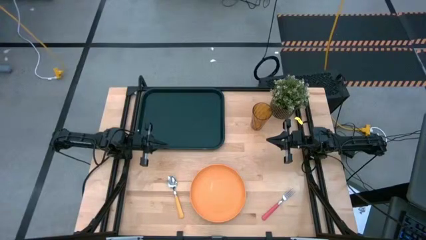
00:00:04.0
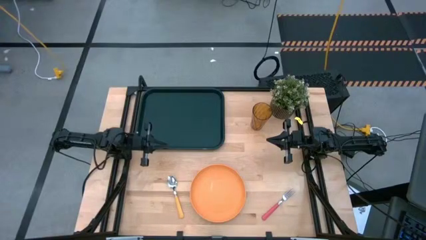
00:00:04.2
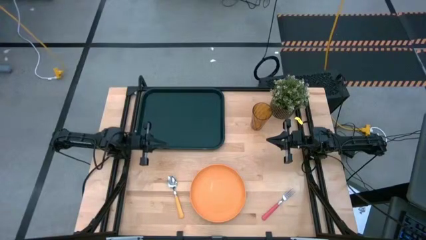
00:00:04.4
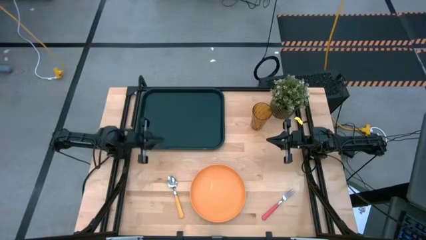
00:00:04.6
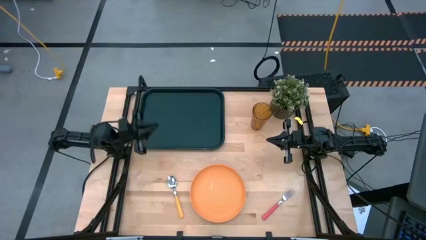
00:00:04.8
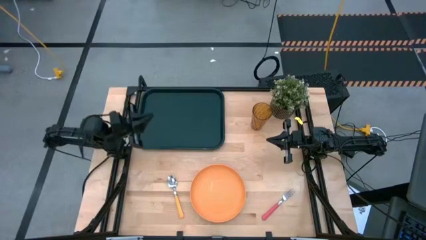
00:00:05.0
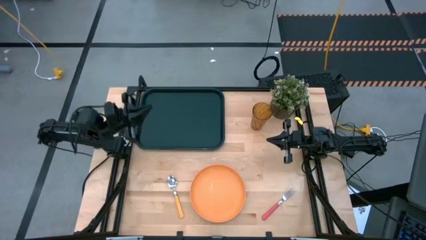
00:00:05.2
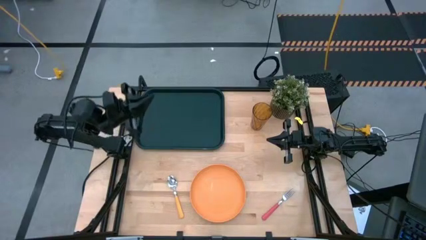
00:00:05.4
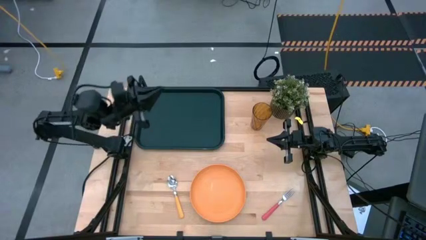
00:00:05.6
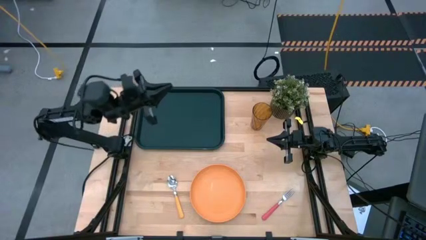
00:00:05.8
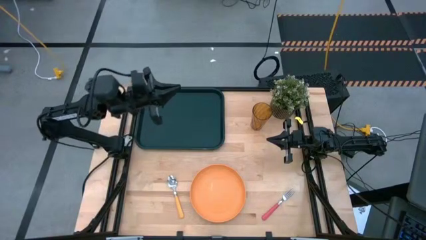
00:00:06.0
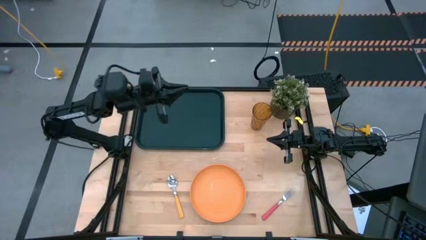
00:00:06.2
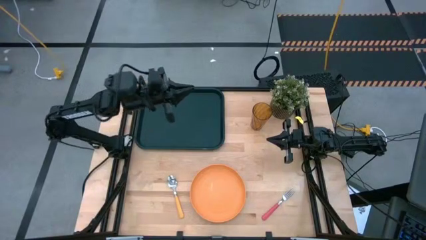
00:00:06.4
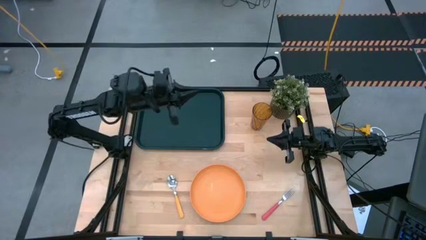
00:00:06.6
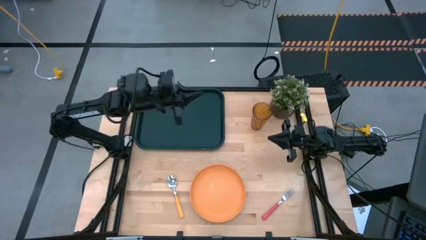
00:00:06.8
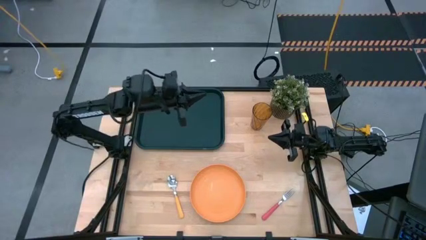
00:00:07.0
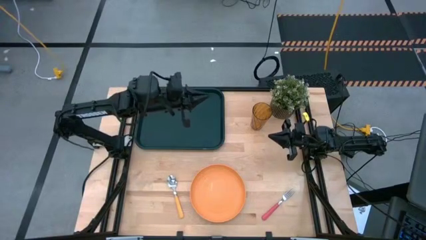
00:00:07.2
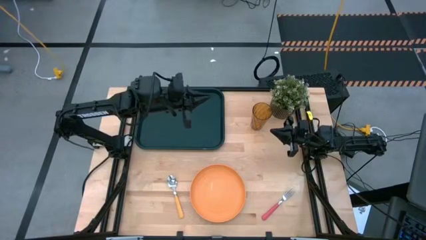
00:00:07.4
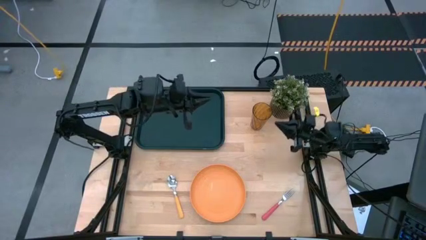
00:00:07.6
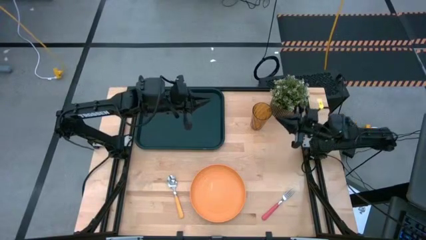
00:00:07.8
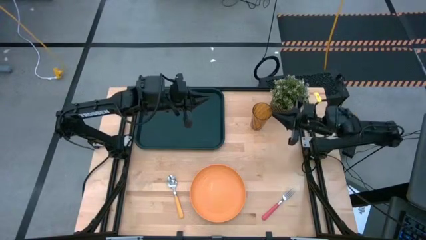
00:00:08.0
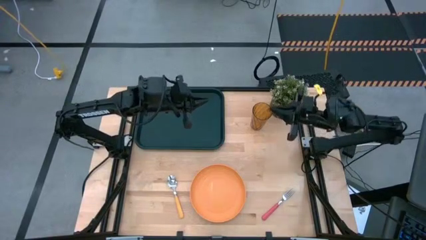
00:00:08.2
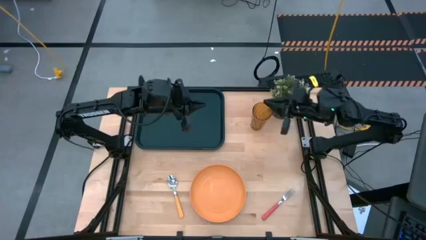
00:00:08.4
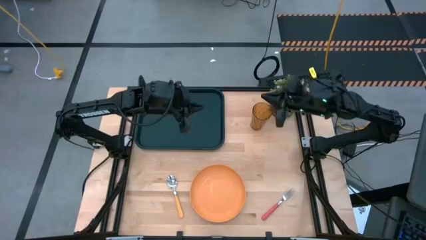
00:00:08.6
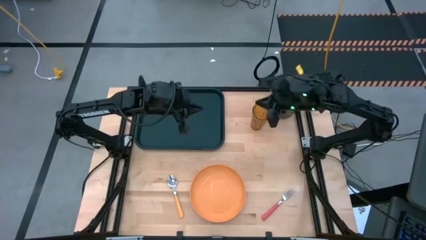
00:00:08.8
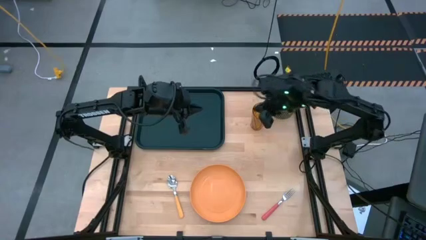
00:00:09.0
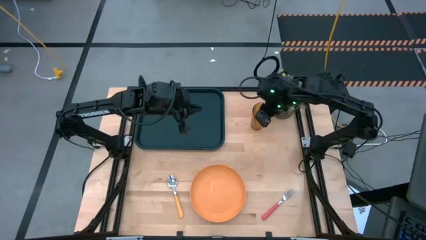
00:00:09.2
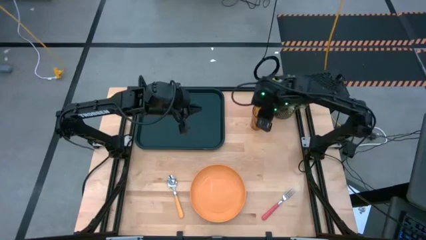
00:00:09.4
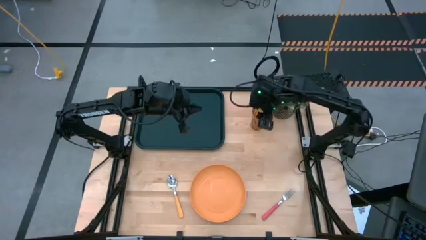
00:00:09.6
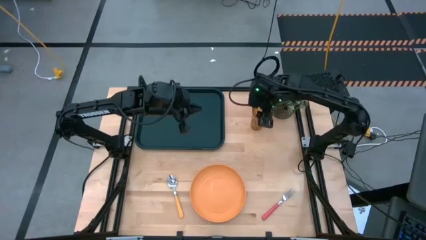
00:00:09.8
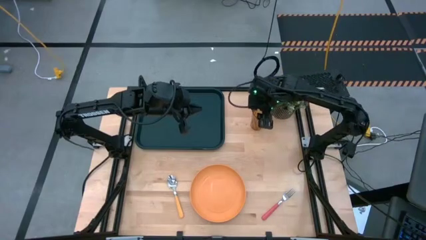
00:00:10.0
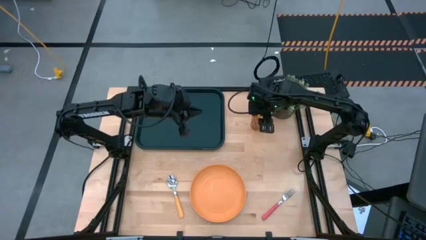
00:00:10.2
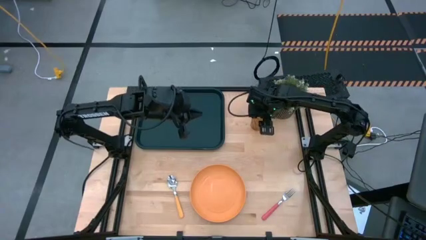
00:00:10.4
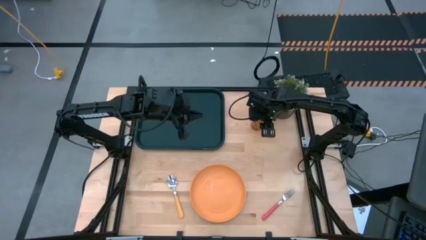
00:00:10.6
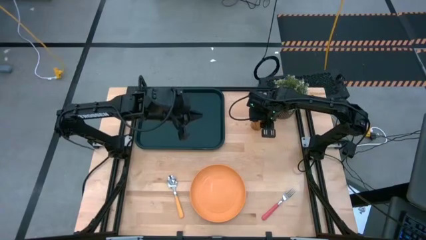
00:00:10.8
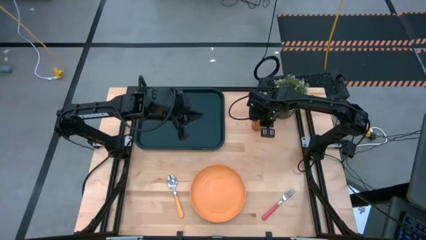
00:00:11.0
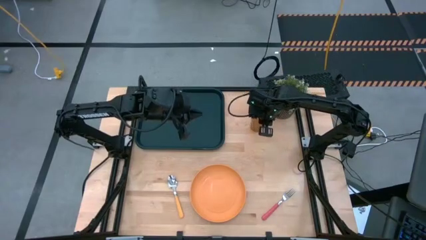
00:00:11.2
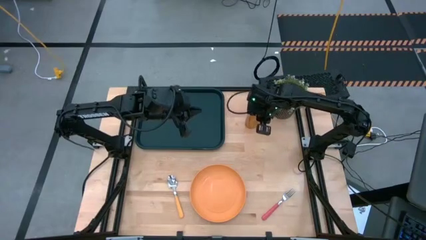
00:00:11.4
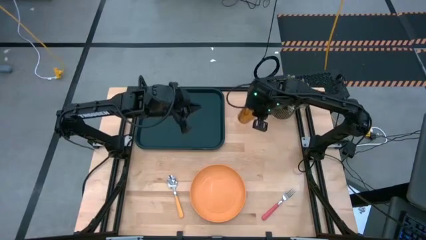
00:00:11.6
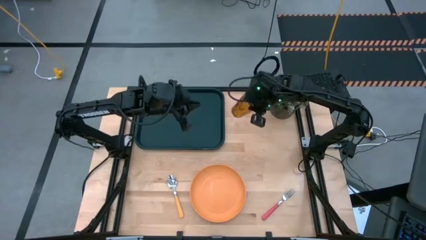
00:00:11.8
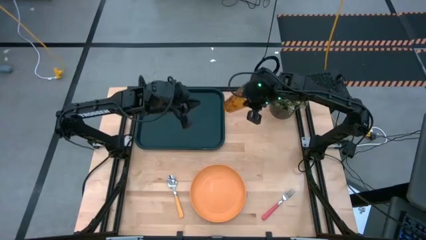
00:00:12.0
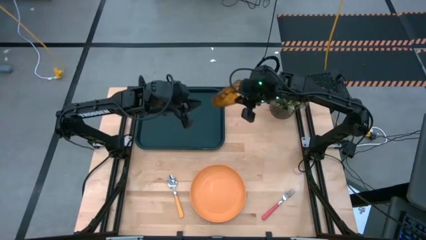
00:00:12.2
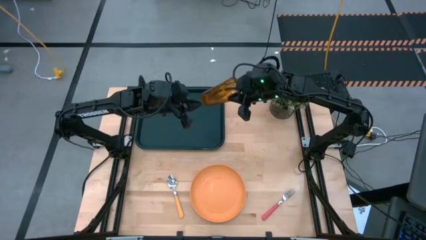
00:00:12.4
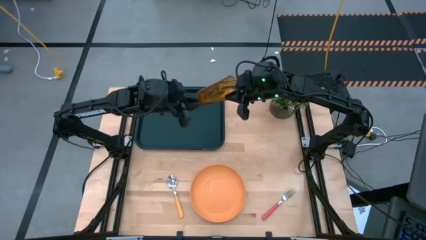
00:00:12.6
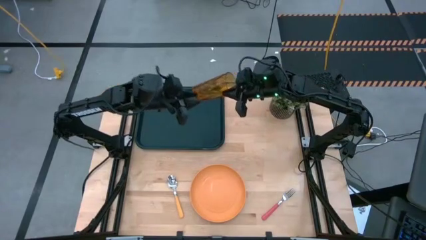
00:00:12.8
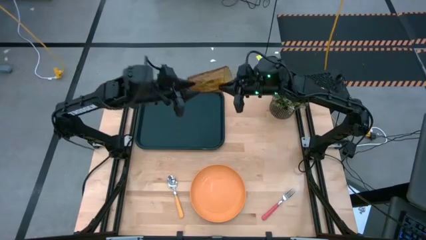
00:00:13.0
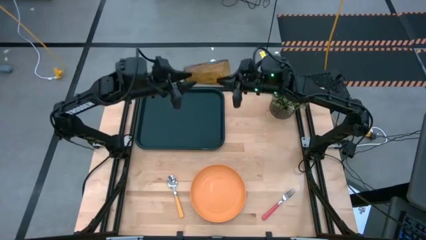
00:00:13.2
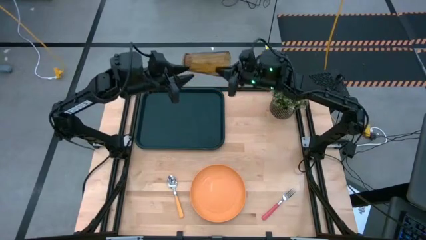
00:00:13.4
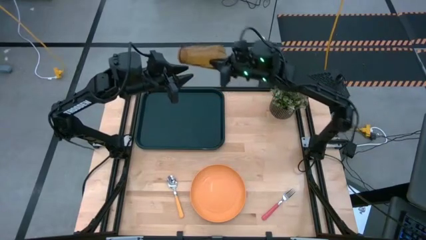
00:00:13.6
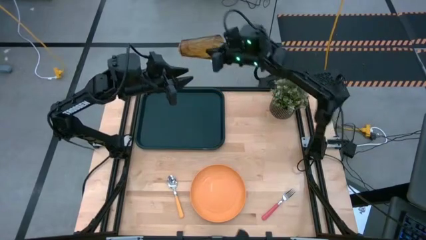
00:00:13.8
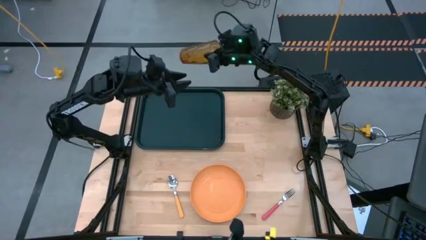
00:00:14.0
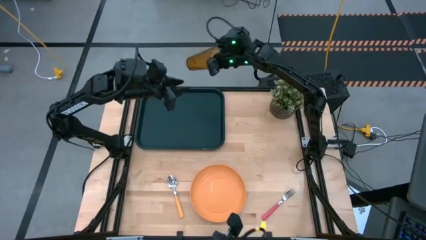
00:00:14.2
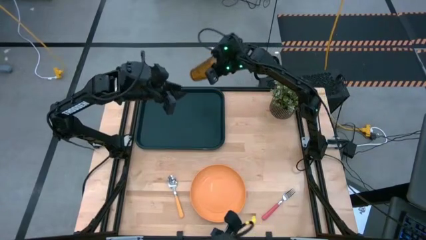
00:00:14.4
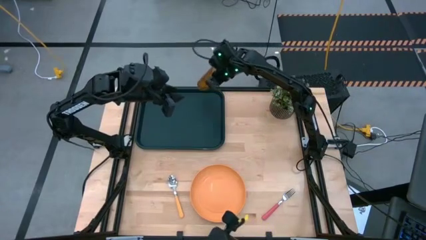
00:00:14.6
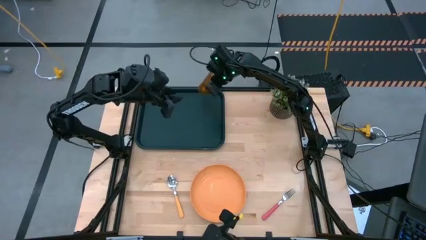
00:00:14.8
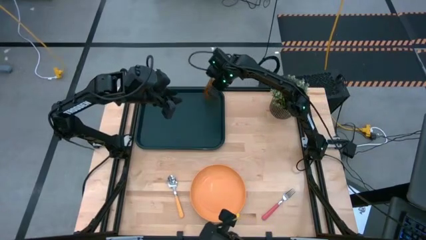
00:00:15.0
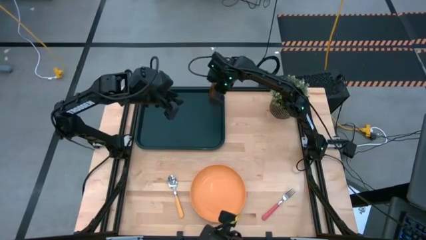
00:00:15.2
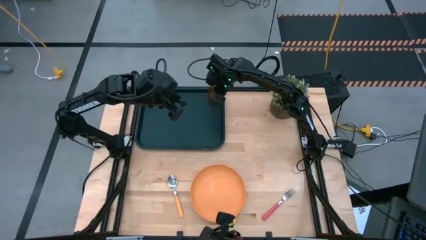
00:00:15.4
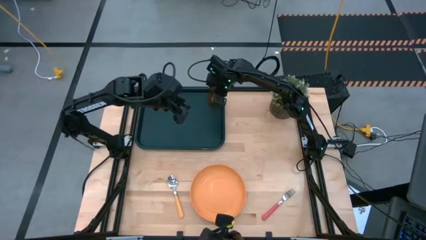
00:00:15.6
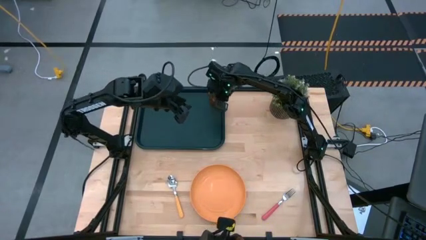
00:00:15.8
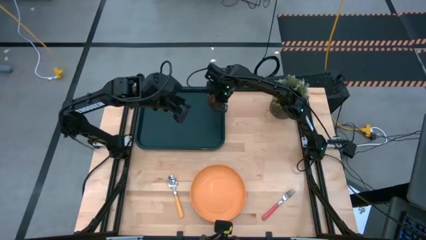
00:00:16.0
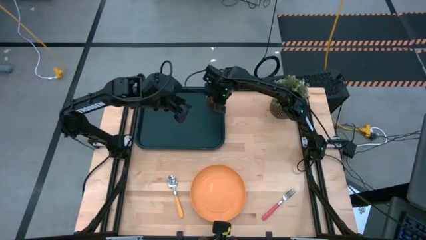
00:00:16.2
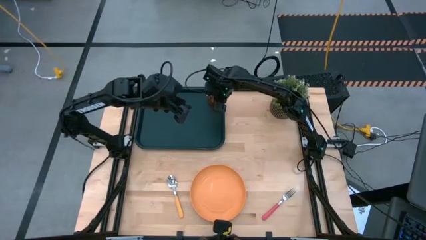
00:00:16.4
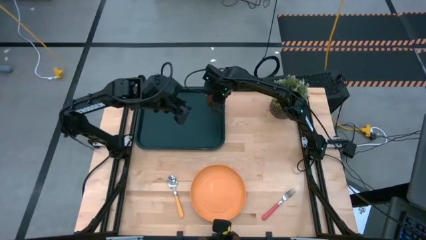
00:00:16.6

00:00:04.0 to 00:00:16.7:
Task: Pick and place plate/cup/fork/spoon on tray
Put the yellow cup on the top right of the black serving tray

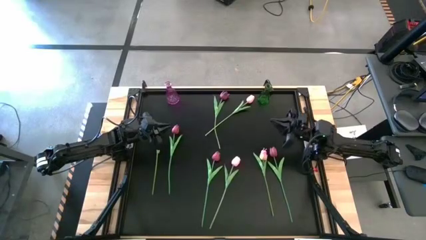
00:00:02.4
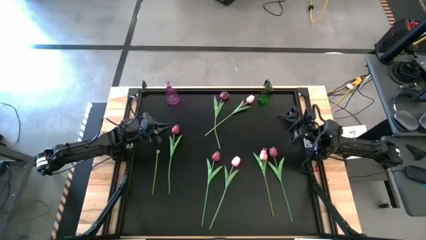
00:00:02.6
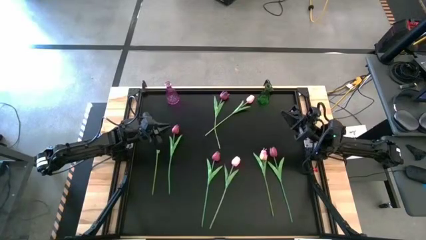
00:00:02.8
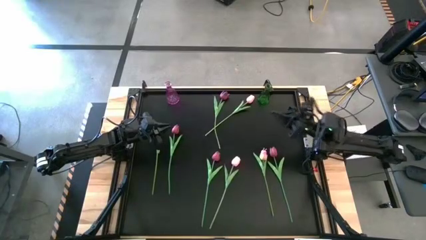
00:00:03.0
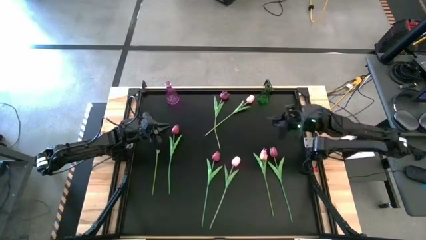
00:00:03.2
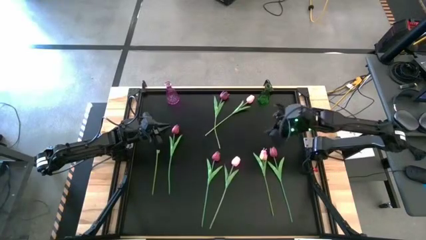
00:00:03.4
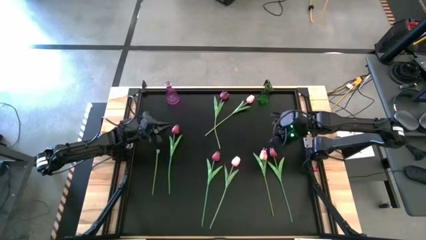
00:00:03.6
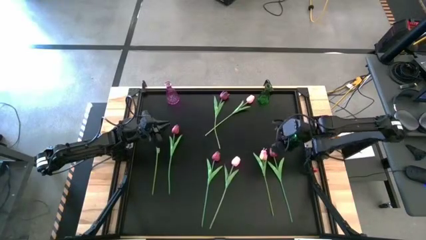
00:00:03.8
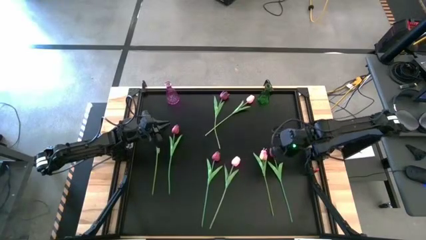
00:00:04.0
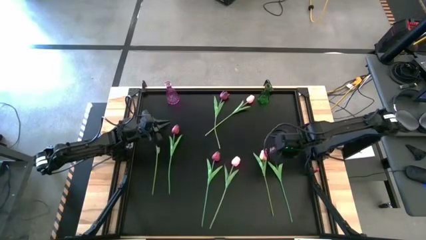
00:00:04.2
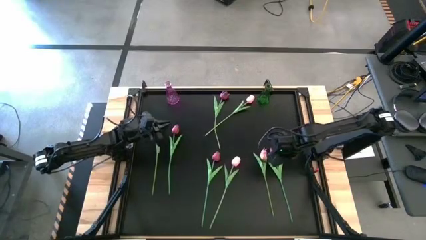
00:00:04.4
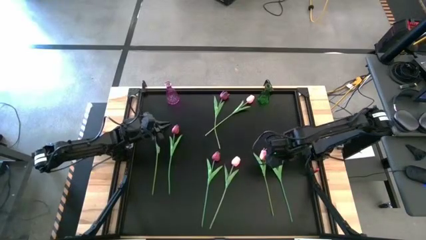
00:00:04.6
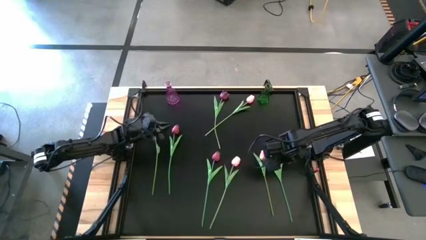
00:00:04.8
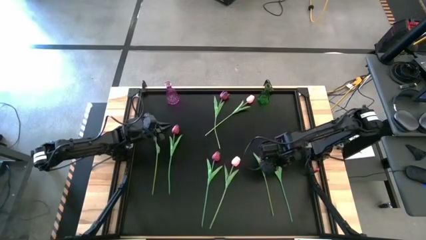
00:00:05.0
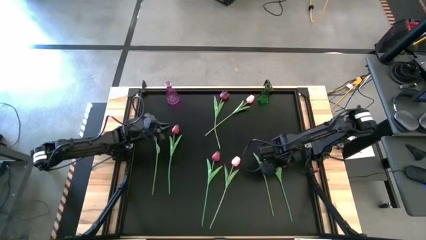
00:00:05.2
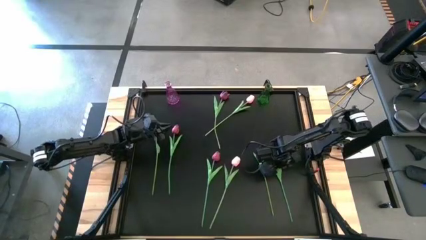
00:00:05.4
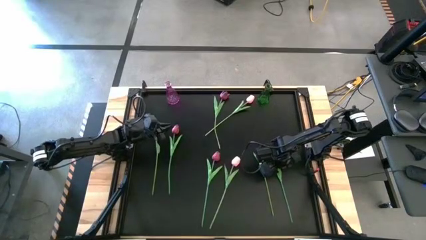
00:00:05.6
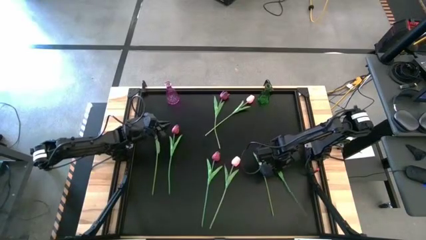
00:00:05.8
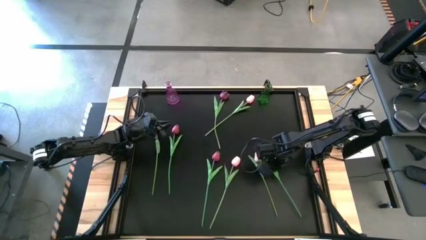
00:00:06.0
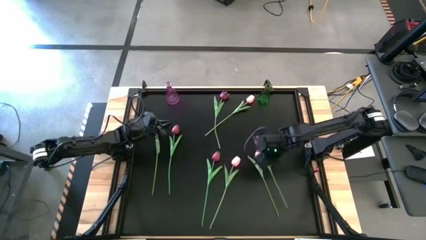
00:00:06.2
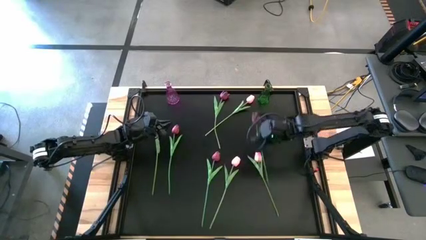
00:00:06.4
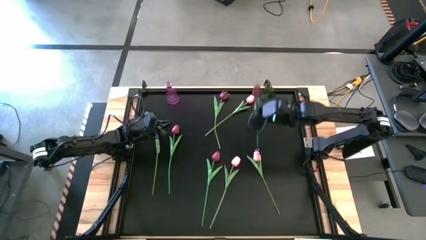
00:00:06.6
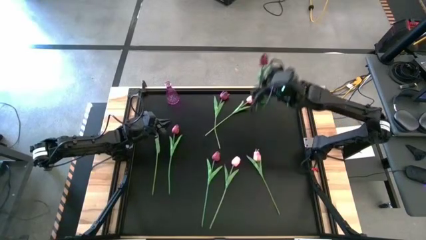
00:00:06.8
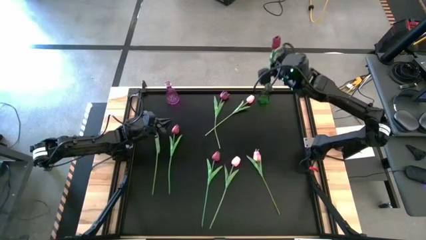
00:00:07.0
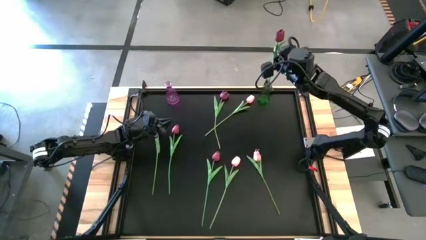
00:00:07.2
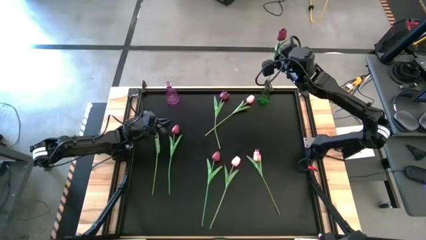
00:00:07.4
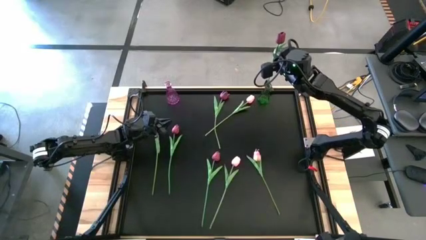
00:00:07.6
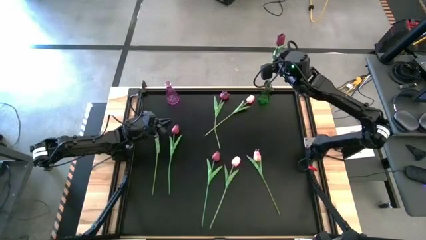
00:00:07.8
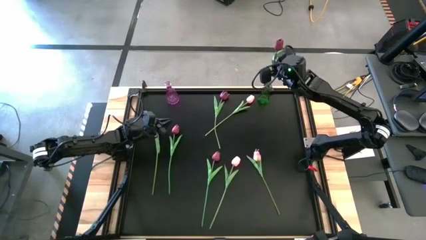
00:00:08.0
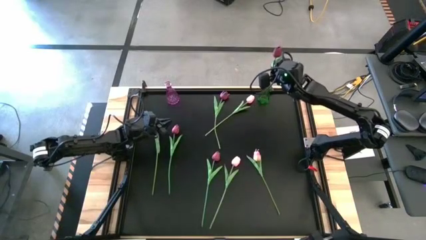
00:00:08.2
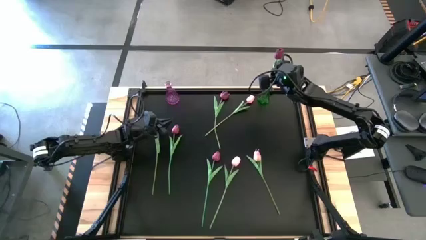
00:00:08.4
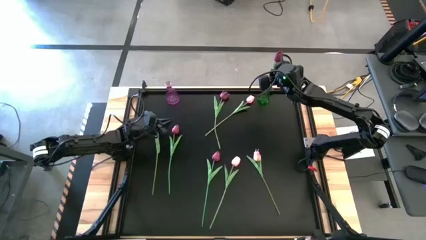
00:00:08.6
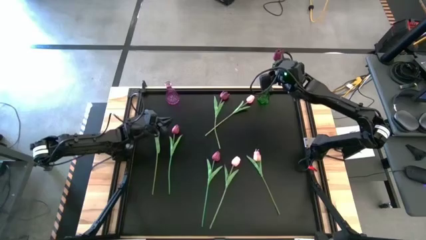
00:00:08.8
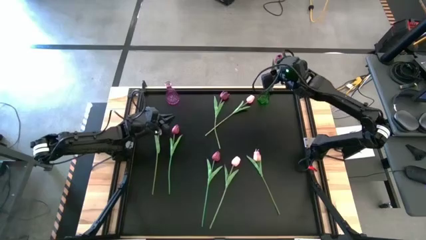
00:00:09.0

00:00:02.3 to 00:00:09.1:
Task: Sort flowers into vase by color
Put the bottom right red flower into the purple vase
